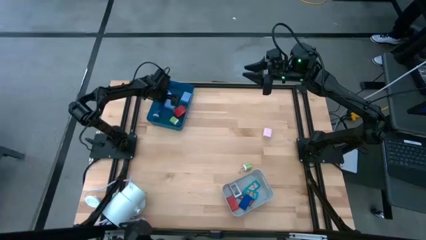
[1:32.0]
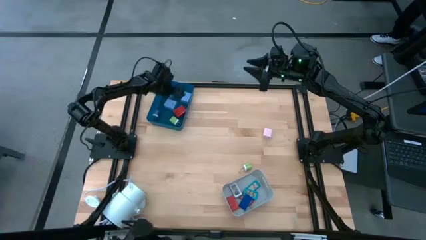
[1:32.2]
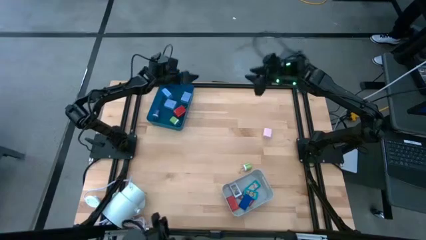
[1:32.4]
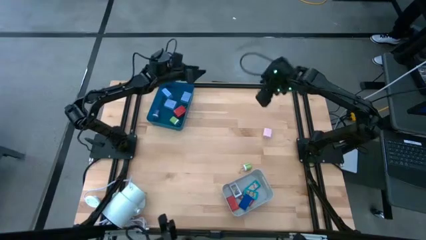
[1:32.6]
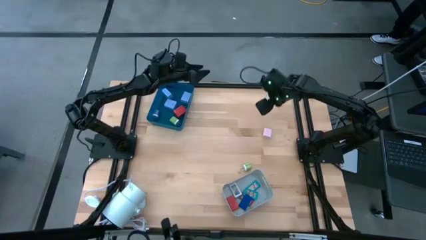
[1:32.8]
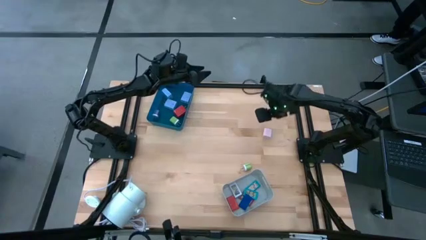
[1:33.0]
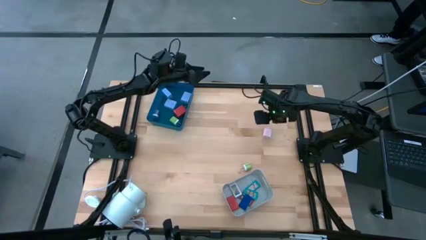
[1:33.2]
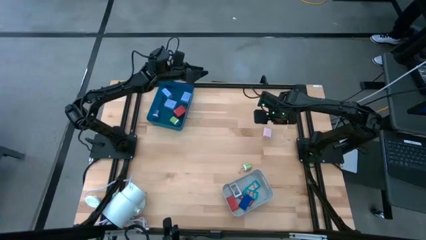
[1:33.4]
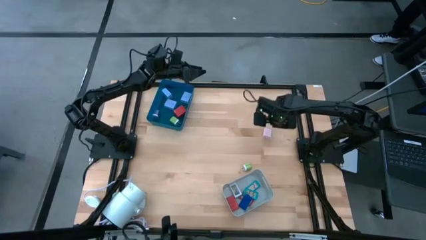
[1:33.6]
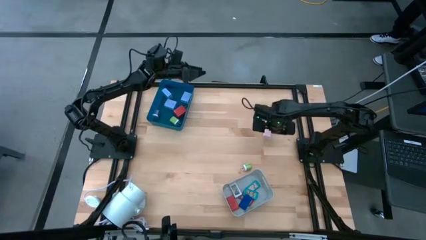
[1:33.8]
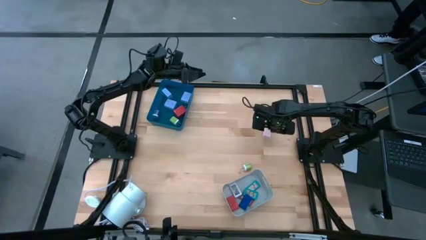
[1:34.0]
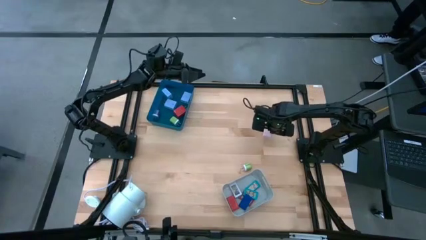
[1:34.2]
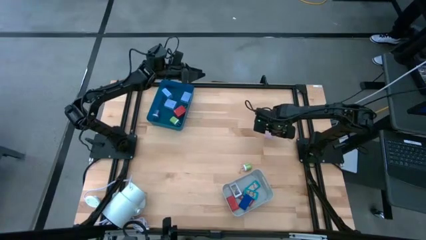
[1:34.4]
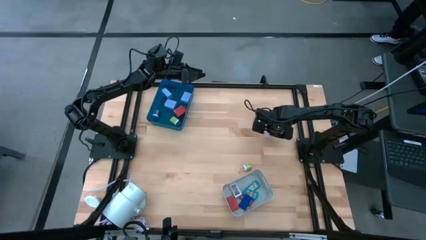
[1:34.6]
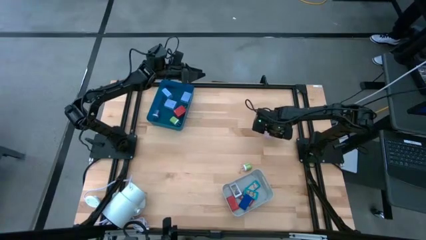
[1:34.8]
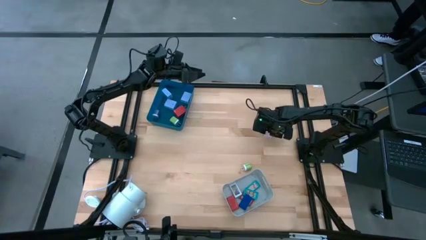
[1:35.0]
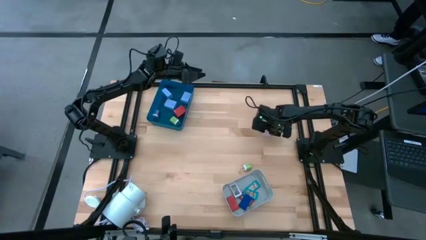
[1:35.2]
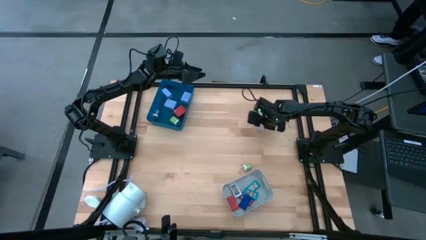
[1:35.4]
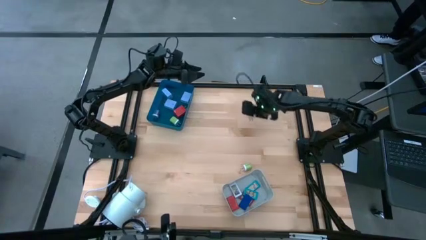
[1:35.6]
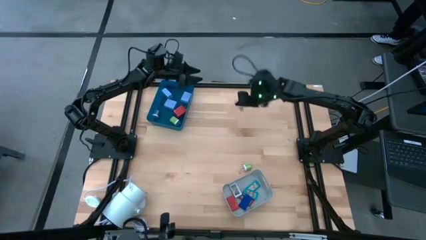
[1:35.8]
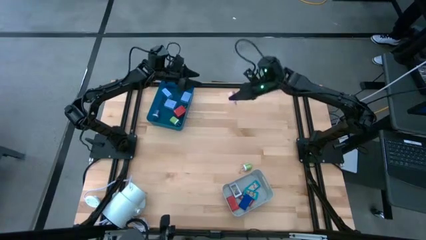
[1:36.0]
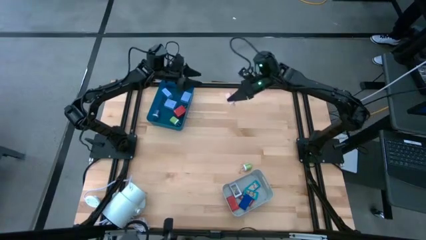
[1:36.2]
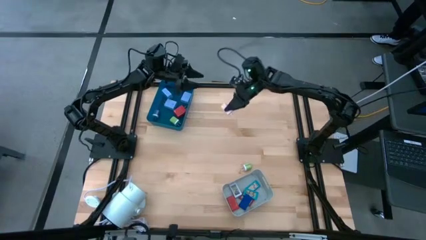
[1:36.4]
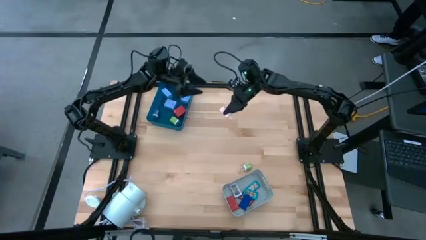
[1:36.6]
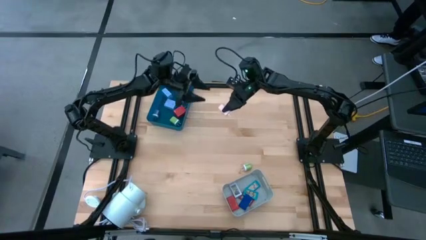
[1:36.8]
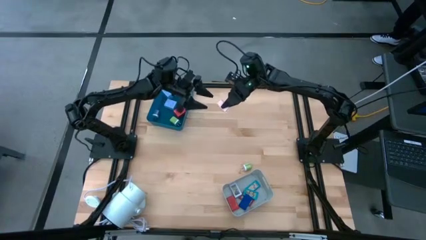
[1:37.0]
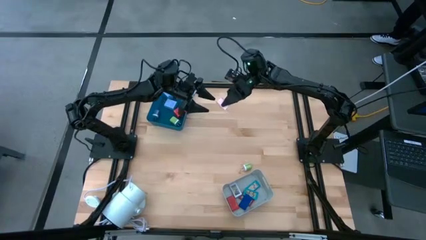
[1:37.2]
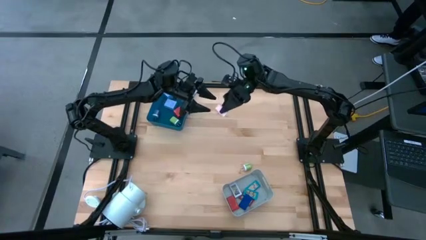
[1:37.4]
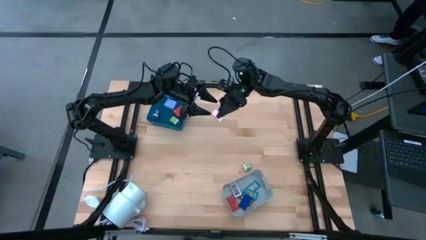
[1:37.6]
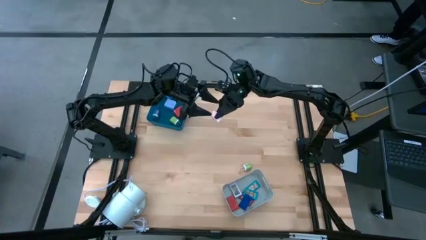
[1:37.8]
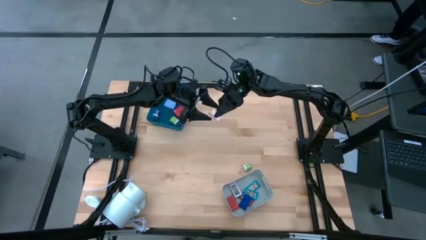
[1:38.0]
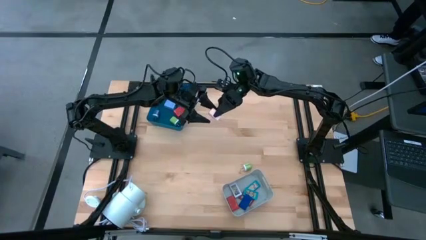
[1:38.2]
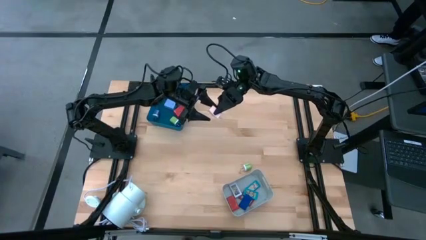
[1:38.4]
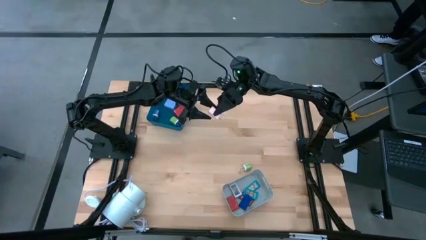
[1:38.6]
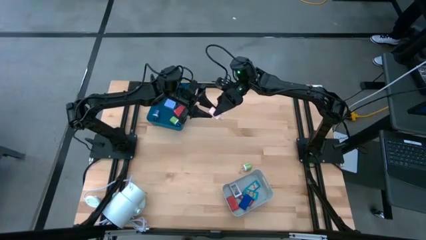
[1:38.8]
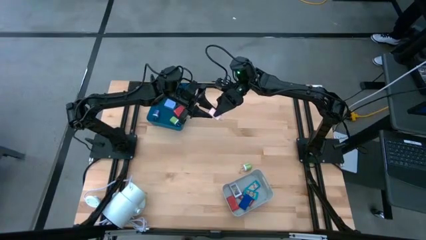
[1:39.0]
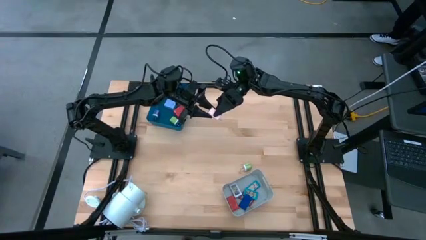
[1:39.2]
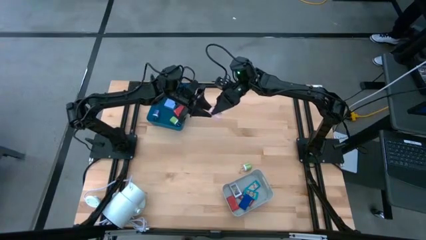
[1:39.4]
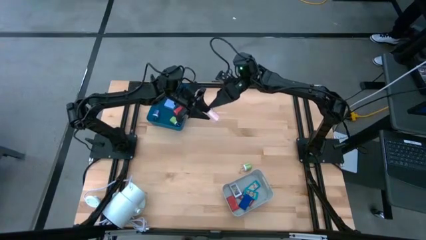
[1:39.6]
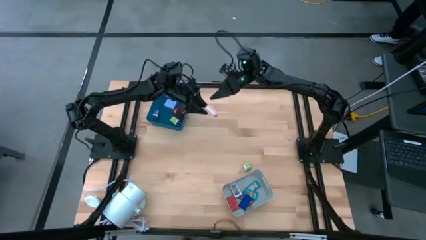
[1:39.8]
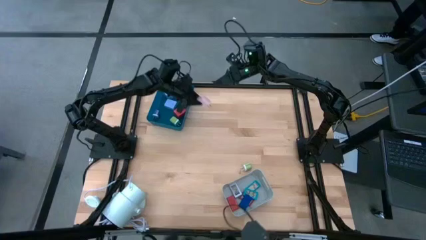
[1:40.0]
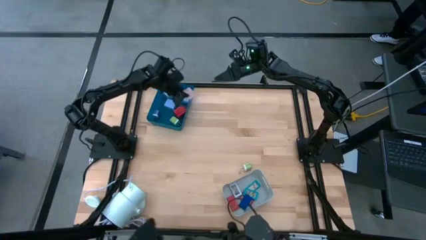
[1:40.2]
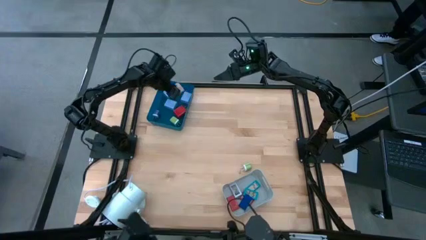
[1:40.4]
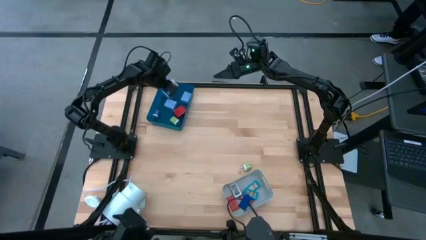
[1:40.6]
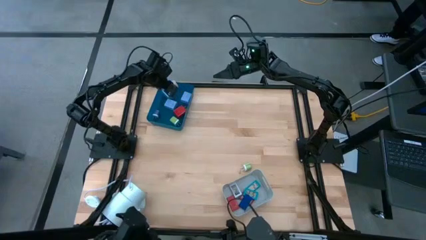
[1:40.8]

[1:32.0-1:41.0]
Task: Pick & Place Office items
Put the white charger adapter into the blue bin

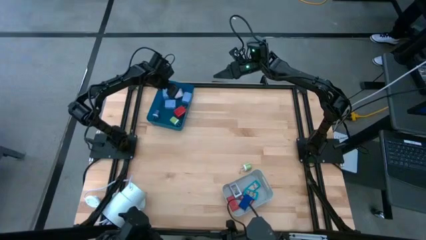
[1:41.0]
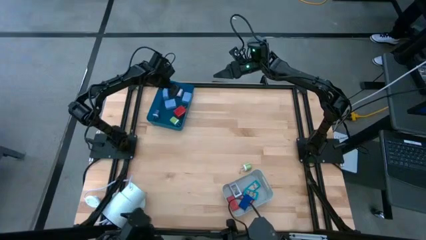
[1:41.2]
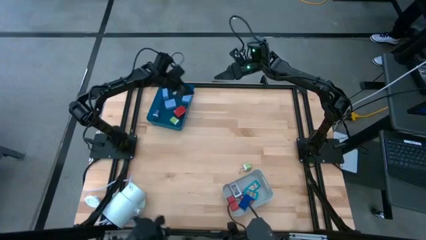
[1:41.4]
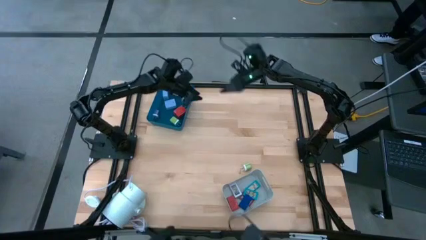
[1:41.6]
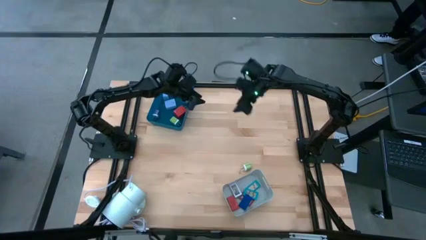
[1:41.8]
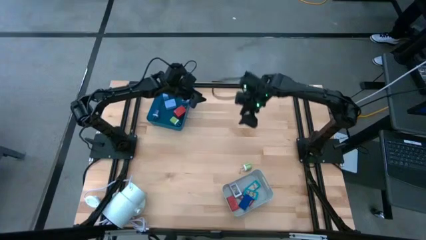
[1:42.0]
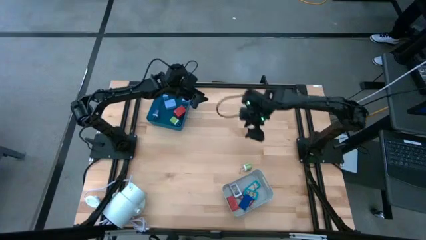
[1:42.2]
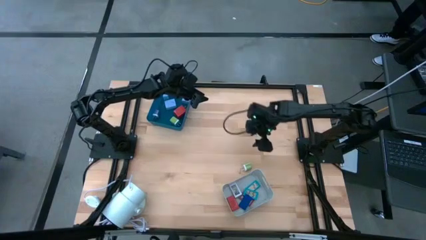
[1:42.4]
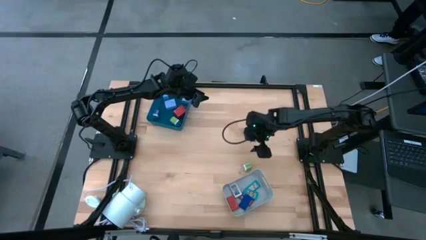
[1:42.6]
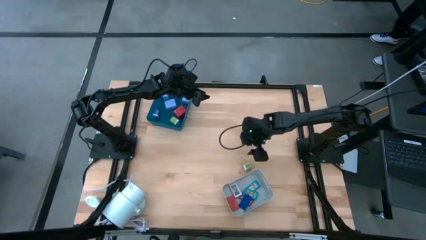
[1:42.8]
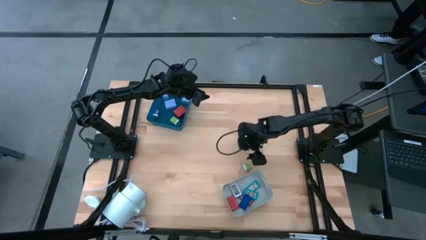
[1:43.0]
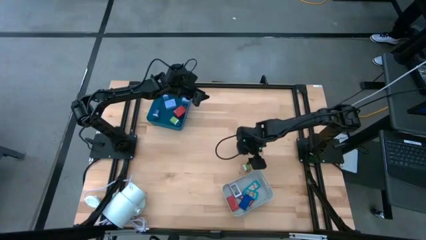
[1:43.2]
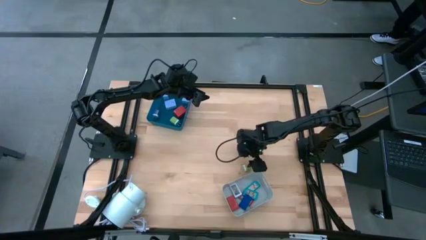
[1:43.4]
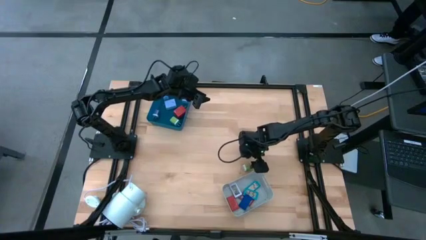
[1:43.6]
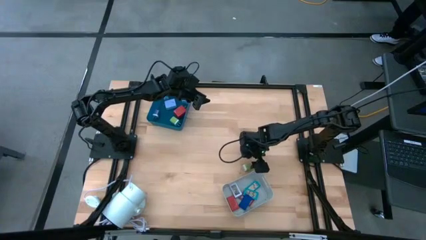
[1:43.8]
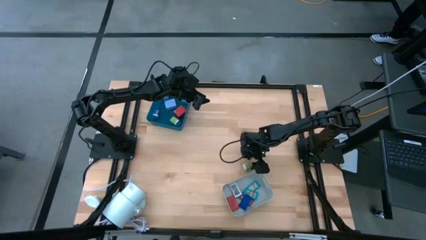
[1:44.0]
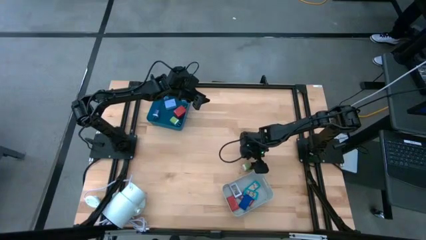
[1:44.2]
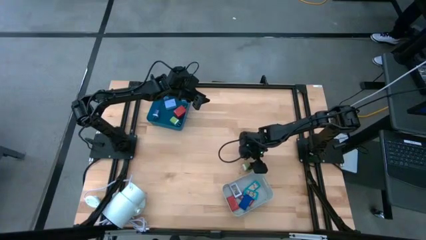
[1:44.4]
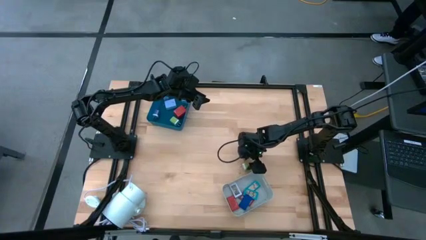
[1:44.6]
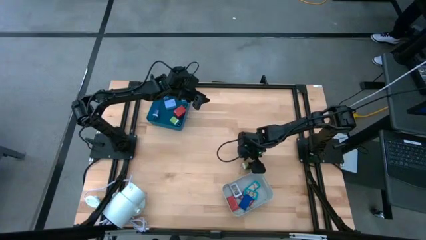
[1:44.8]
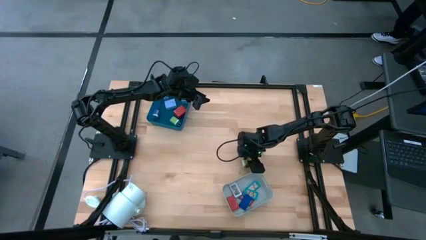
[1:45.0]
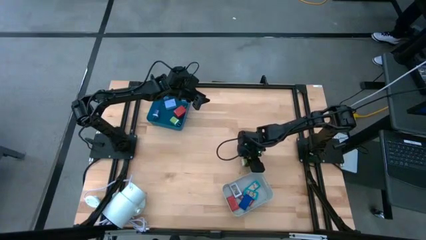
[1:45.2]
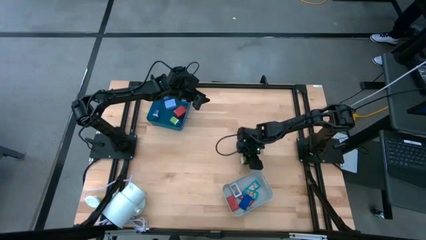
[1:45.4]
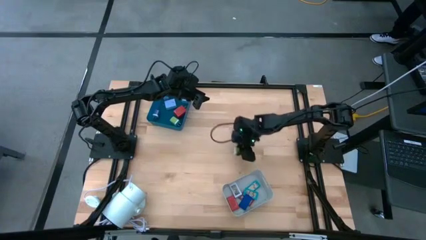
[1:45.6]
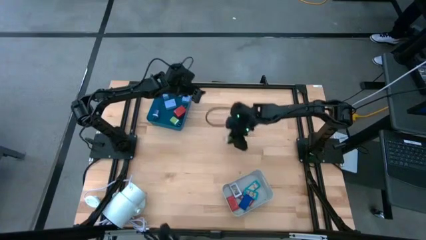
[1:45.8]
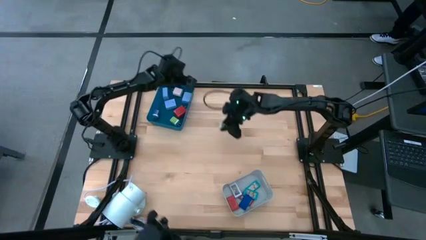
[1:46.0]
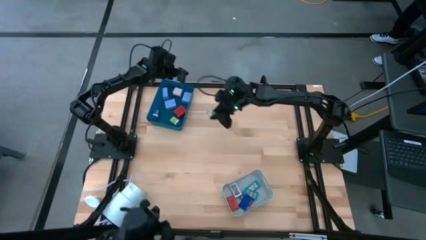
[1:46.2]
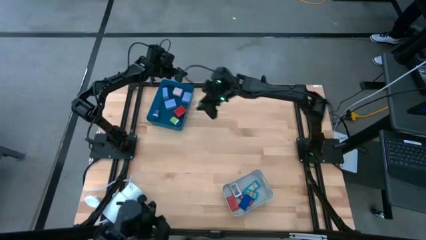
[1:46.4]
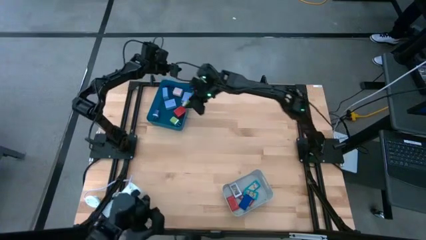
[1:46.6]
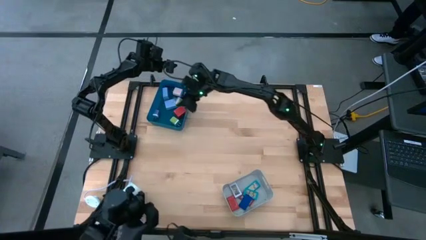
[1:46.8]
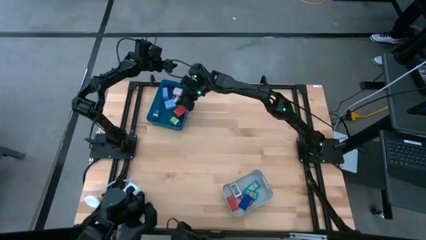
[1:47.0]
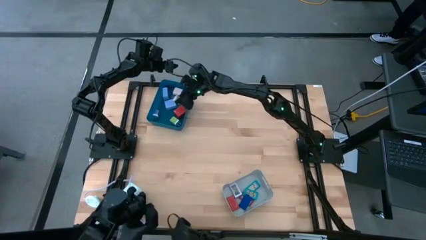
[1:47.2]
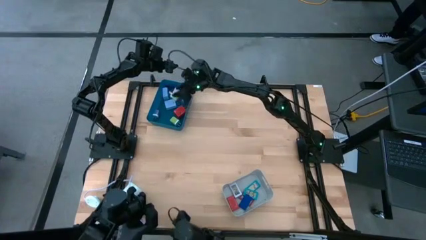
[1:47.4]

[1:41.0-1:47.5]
Put the green charger adapter into the blue bin

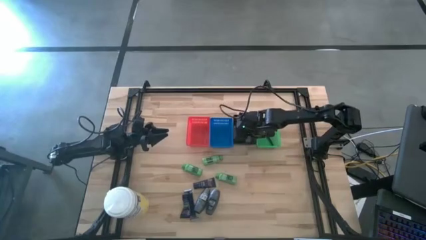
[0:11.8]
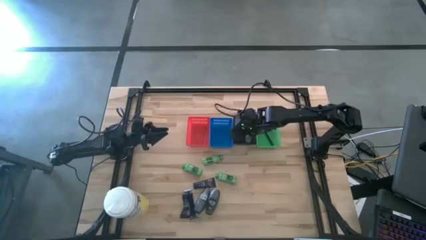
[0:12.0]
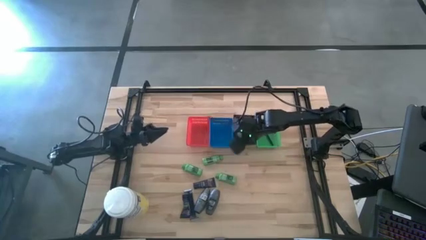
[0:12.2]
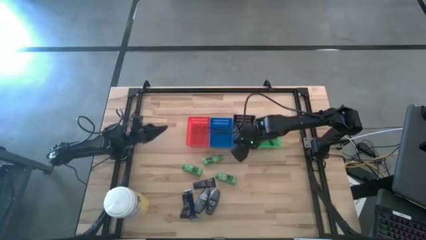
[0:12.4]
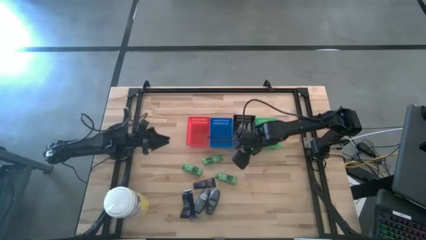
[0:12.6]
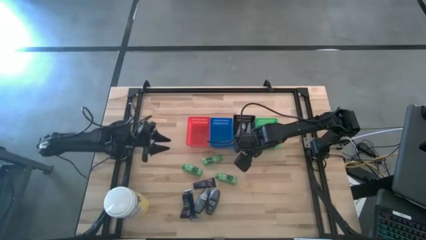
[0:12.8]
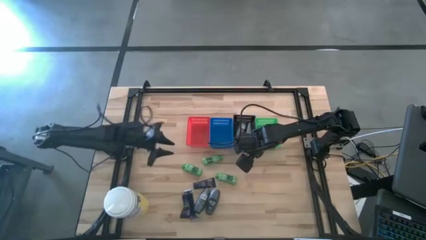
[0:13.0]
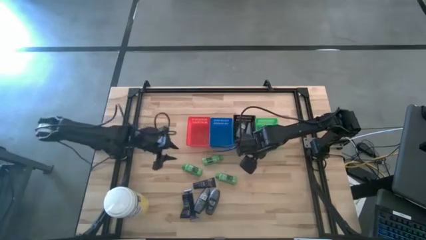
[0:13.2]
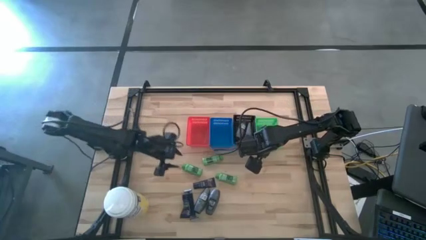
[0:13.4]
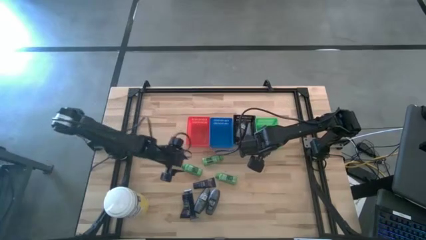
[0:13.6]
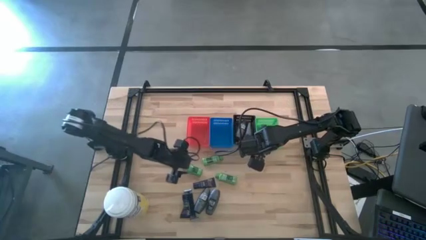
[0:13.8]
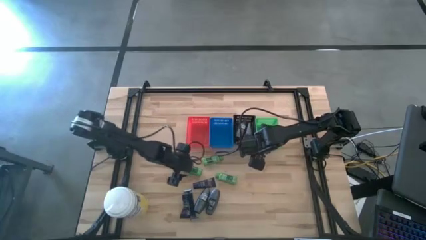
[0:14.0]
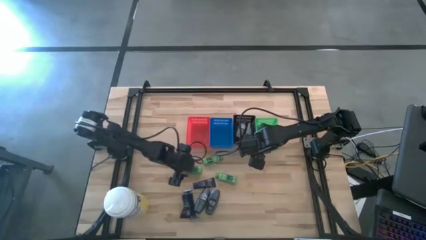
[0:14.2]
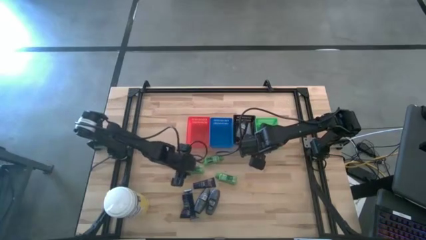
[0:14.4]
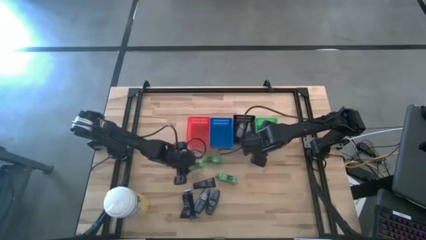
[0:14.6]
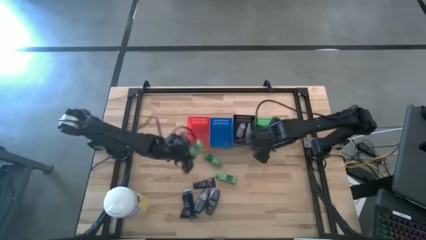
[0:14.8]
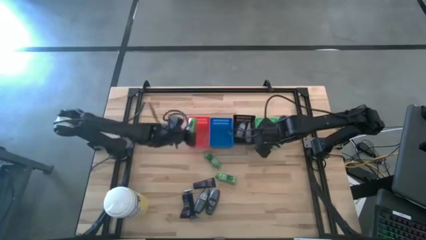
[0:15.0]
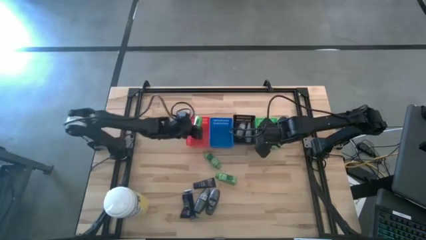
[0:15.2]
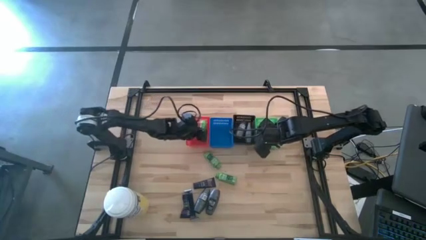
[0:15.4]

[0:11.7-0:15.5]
Task: Pick & Place Travel size toiletries
Put the green shampoo into the red bin
